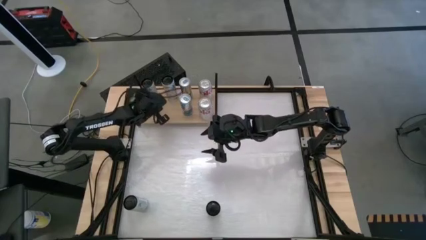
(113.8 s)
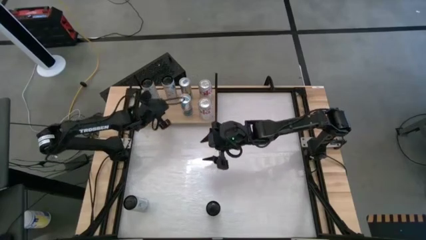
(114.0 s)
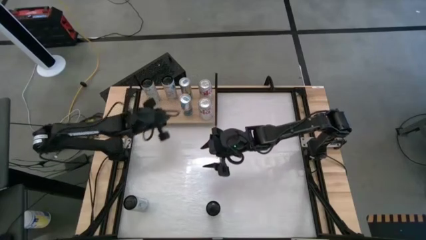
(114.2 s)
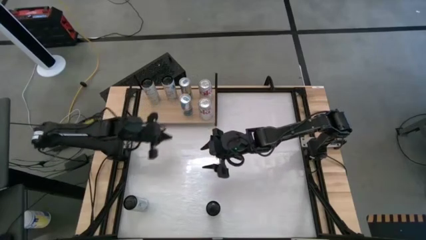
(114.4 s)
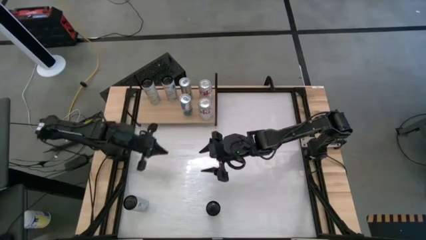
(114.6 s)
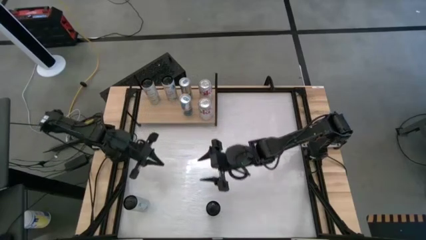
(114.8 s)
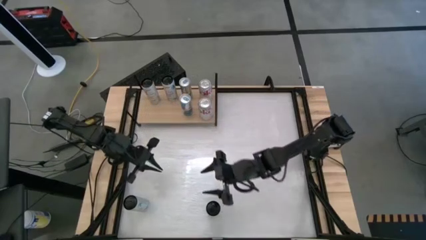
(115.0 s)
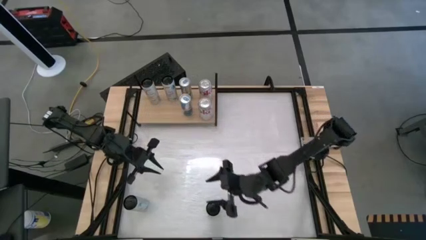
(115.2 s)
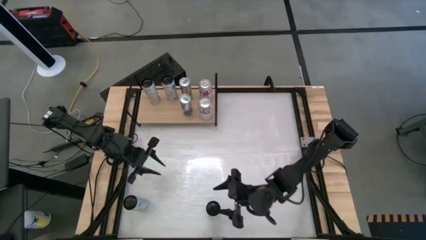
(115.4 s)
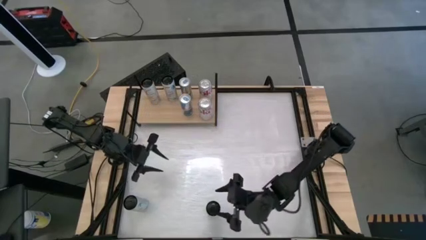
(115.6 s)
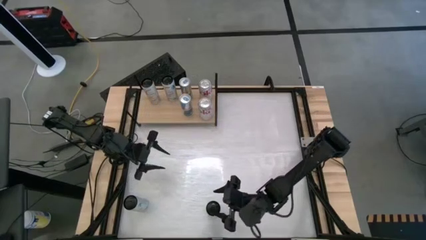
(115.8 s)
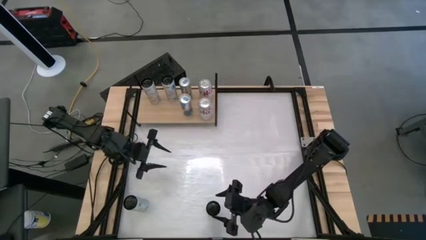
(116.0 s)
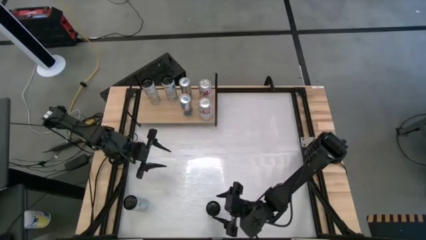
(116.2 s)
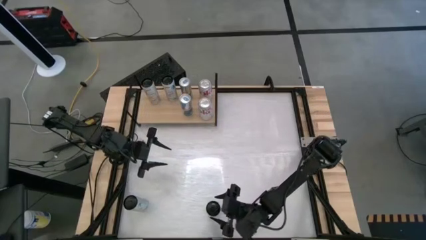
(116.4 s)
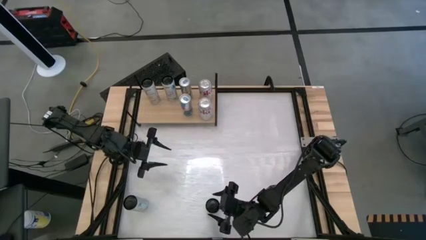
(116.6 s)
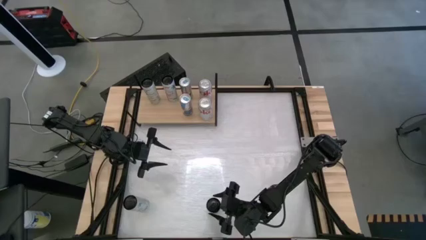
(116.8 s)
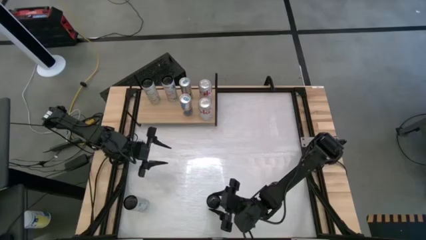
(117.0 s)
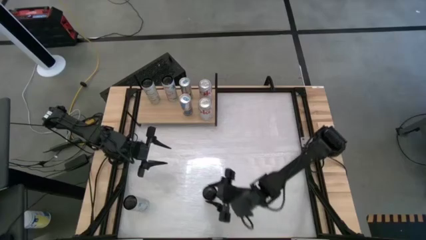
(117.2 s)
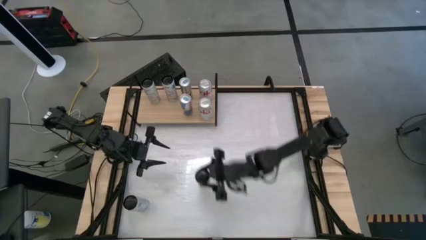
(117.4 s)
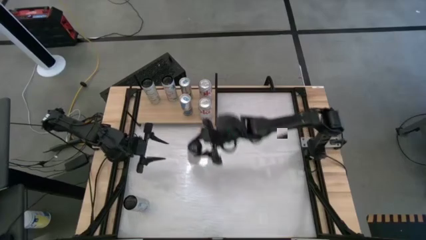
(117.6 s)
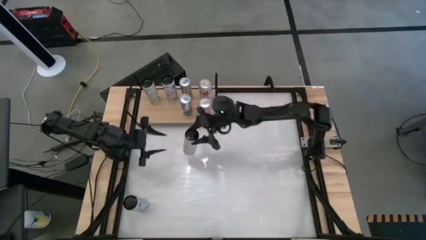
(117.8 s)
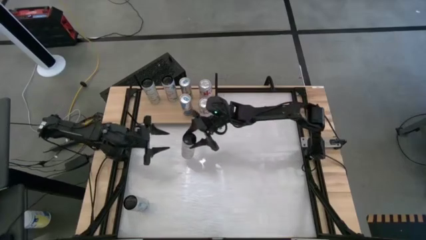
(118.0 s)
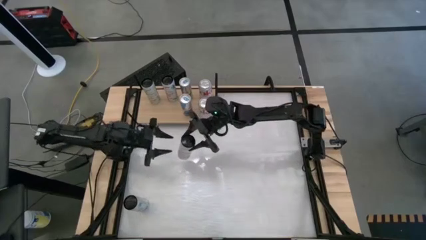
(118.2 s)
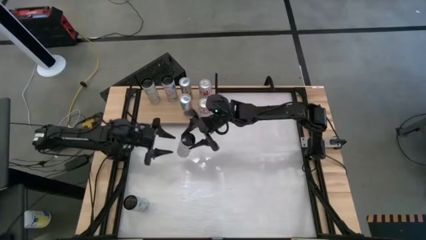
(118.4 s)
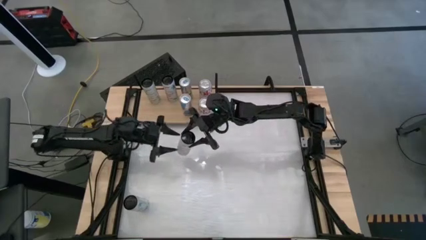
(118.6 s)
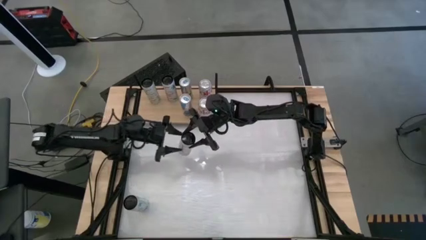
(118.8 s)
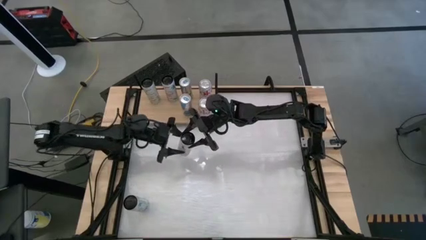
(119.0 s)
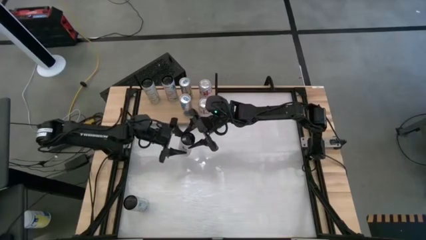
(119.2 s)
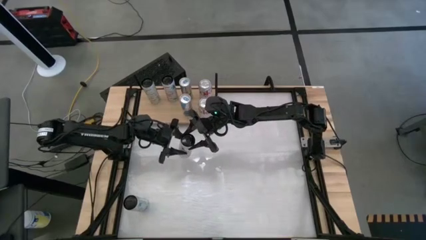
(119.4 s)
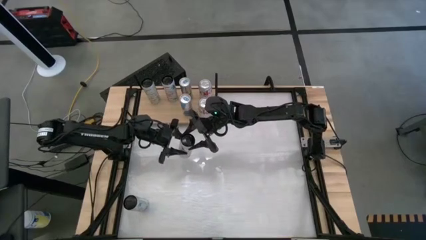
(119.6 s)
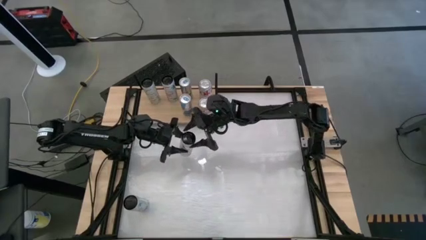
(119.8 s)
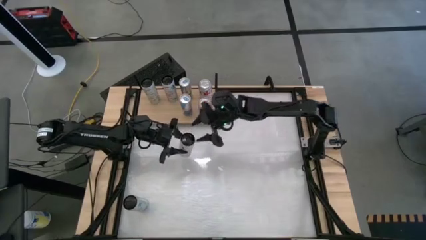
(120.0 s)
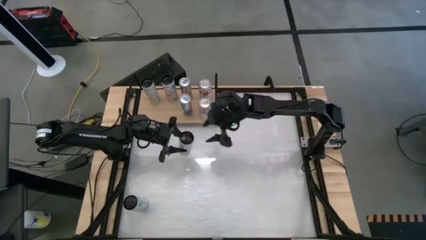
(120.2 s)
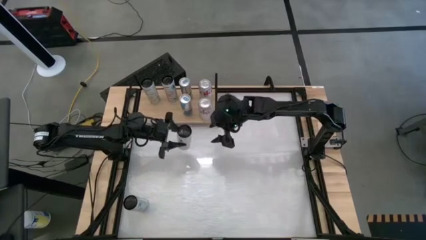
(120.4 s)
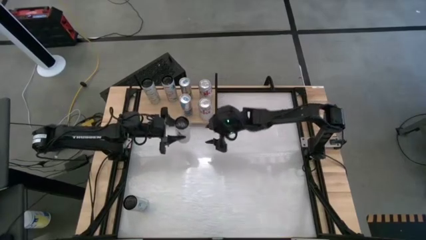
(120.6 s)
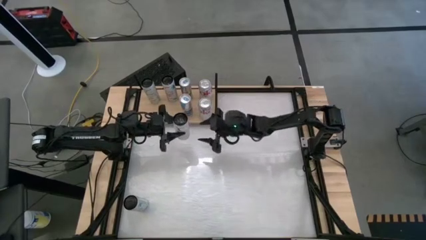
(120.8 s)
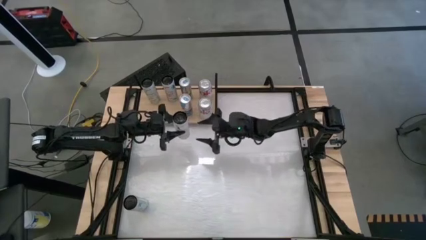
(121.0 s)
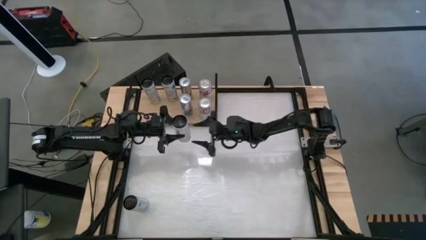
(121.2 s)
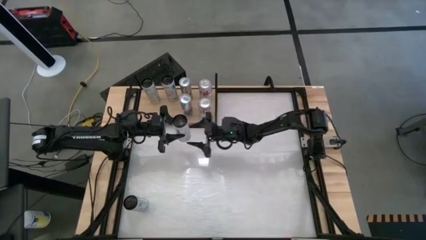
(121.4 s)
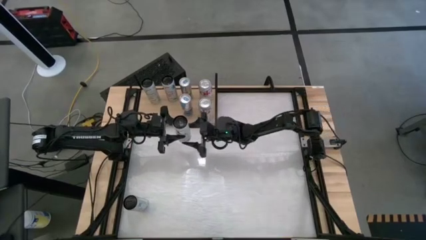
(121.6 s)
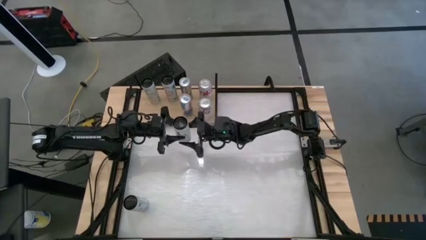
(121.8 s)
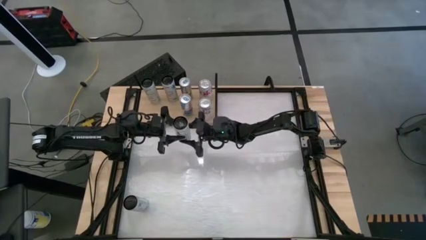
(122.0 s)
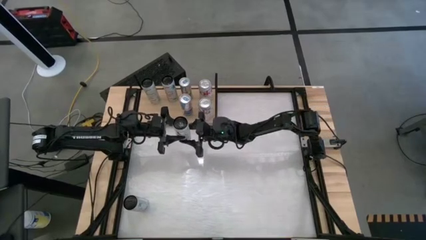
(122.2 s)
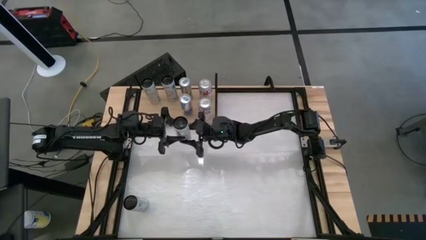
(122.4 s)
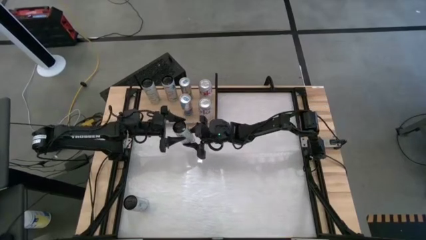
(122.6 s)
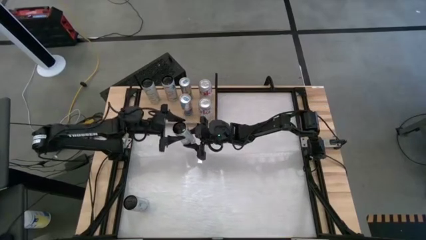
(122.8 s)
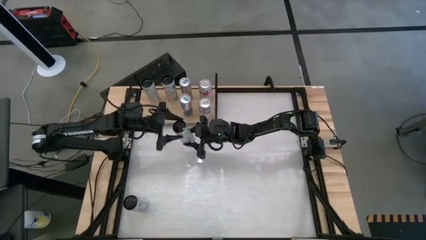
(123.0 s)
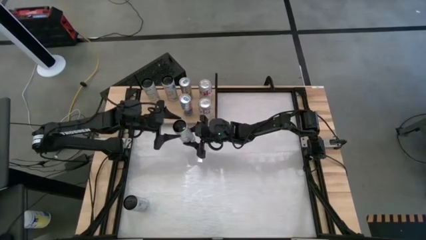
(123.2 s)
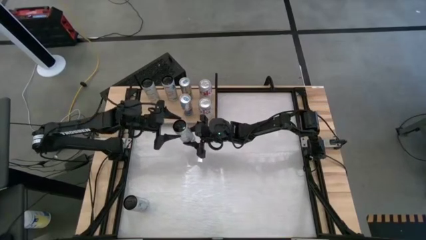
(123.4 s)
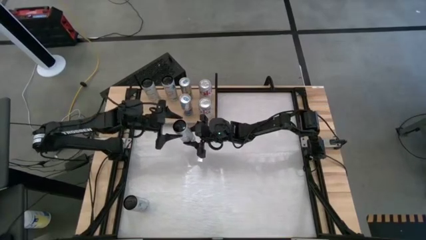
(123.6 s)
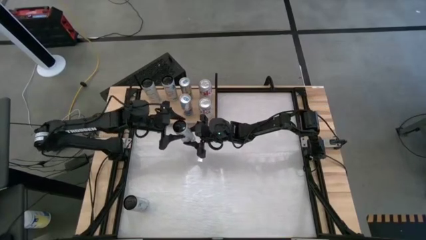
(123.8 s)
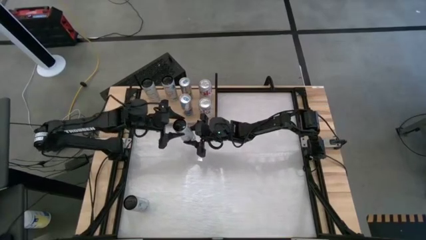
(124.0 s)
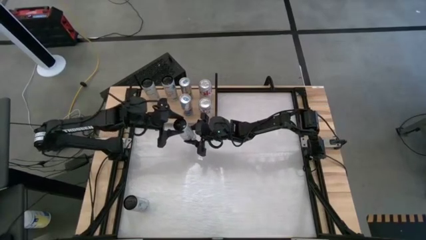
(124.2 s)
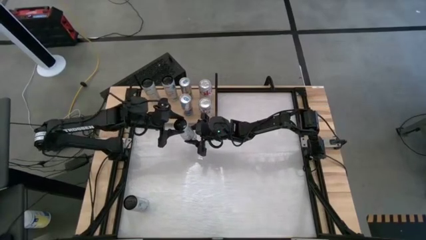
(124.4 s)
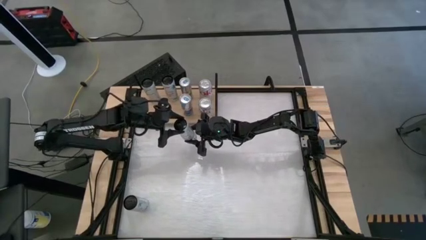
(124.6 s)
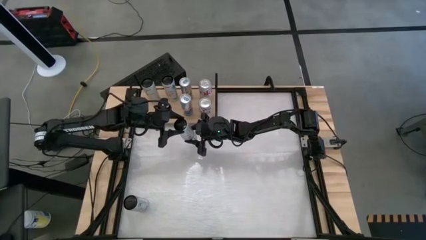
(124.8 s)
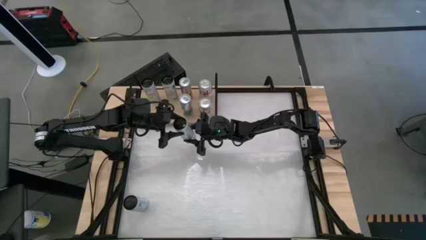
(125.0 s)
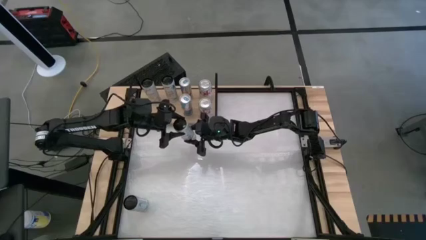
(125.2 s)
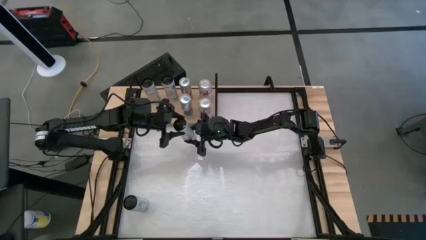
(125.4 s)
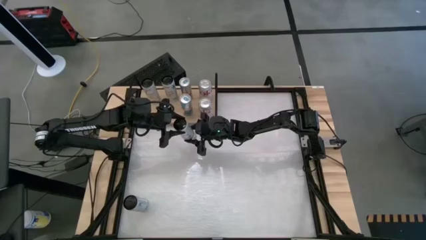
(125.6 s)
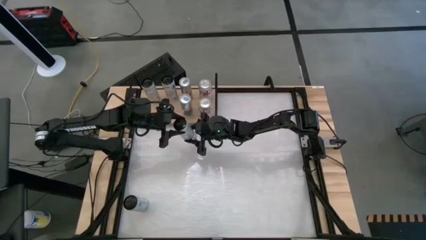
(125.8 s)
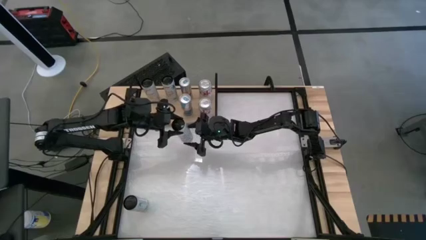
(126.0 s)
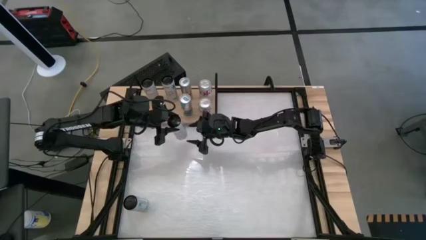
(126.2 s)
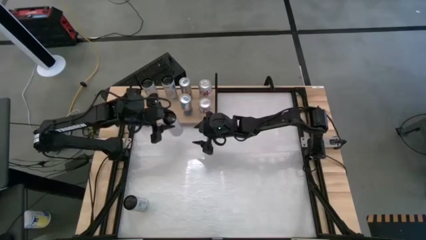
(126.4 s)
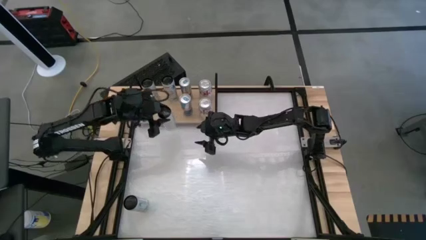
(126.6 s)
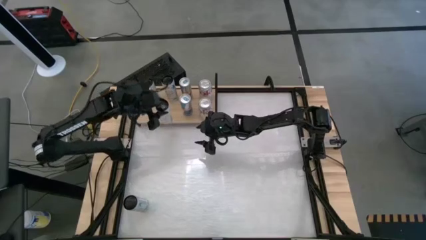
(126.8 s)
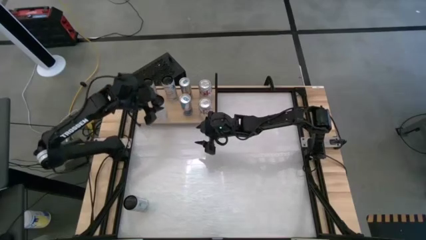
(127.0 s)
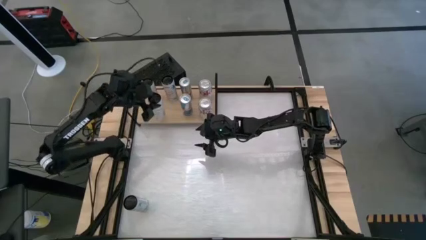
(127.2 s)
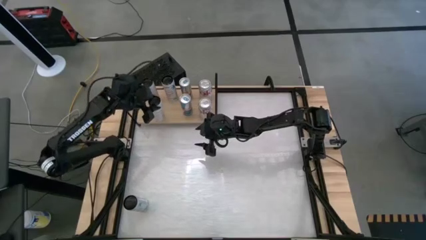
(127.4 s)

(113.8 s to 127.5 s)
Task: Place canned beverage on shelf
Put the yellow soda can on the shelf aligned with the other yellow soda can

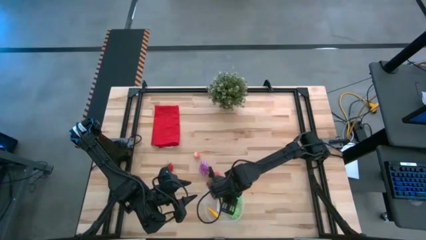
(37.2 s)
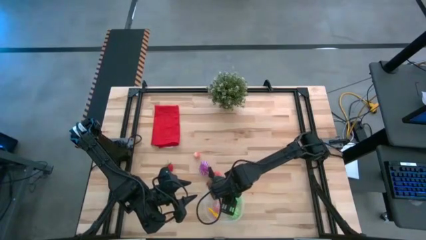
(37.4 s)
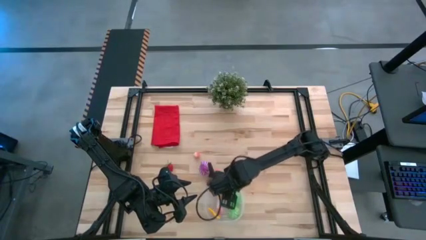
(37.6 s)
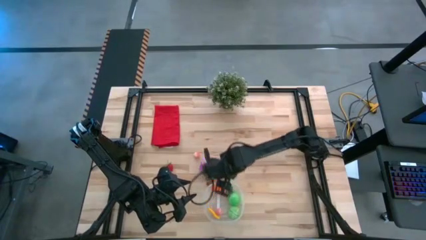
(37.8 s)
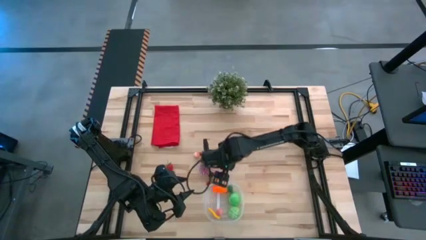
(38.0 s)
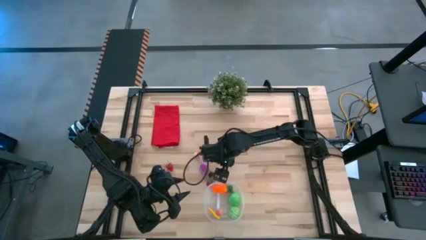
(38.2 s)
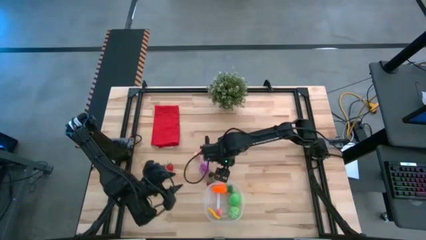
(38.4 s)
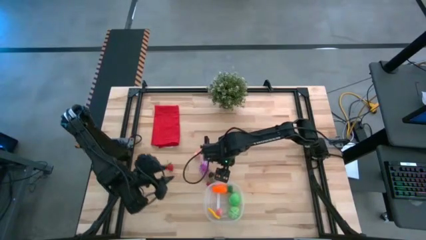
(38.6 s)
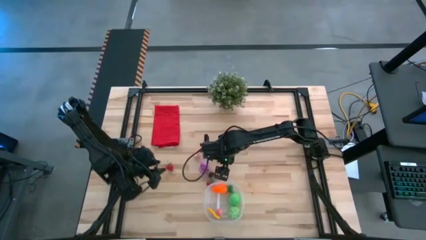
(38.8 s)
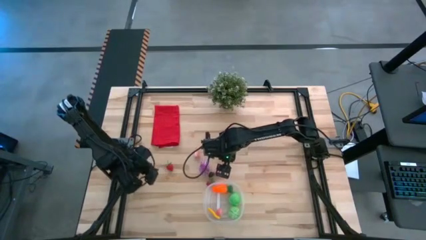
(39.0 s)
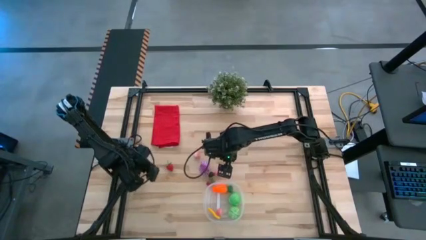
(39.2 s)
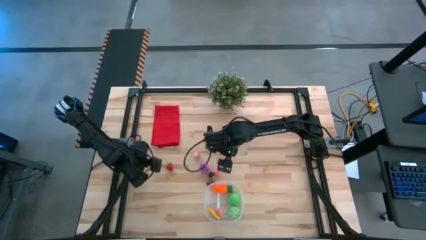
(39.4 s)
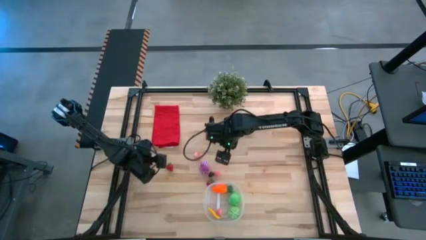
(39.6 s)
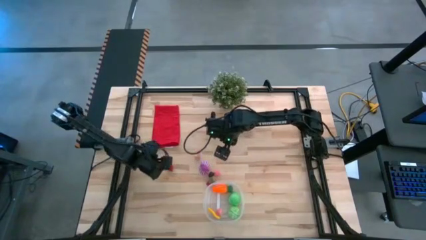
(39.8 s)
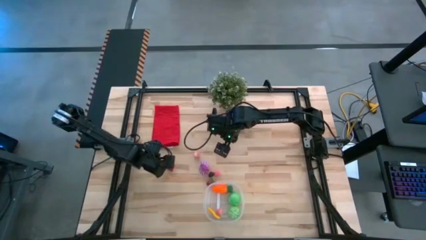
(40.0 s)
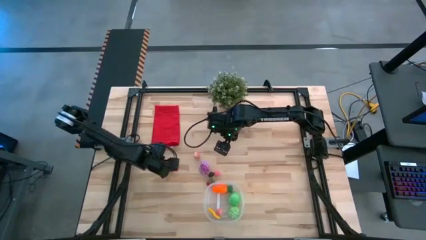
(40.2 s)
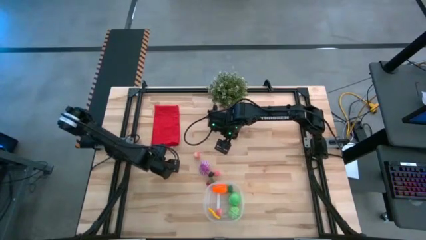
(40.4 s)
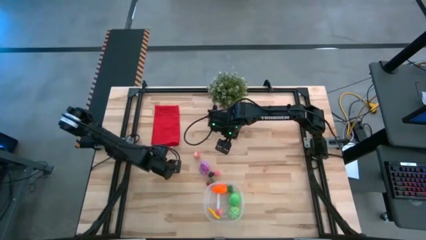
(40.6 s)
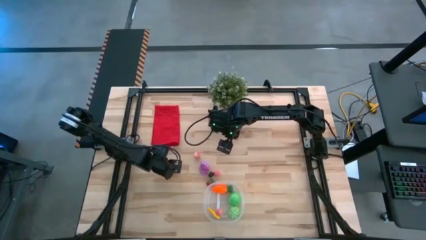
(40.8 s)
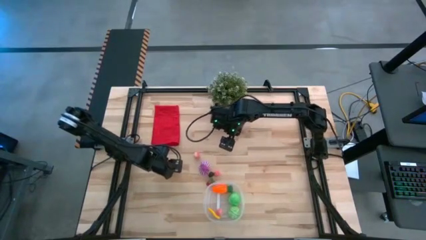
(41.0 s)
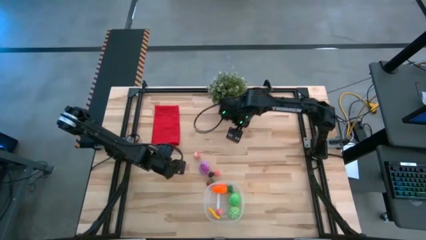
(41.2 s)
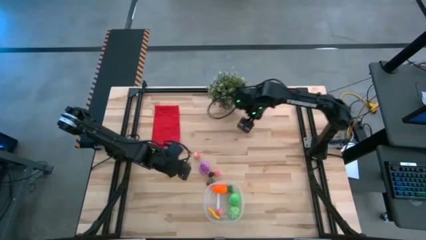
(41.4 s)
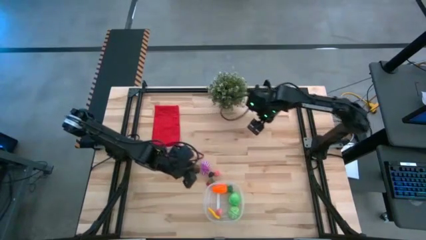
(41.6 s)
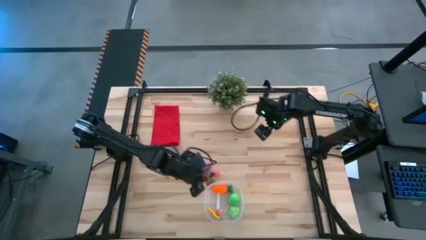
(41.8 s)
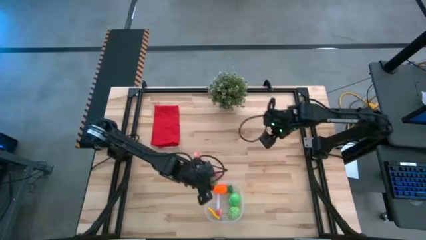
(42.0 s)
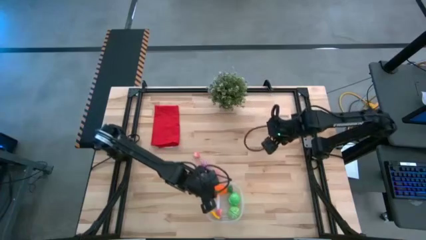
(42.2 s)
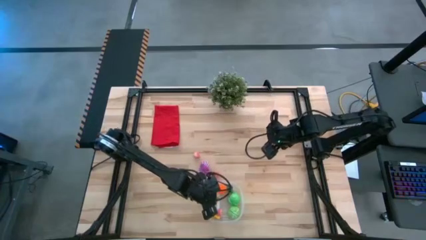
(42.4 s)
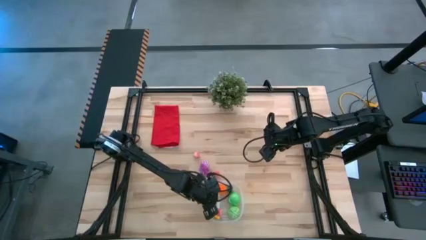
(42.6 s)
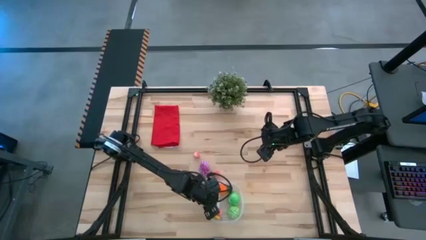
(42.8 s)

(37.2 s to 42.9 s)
Task: Pick and placing Produce into tupperware
Put the left red strawberry into the transparent bin
